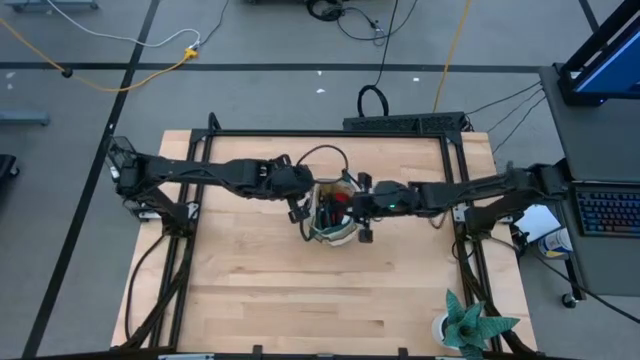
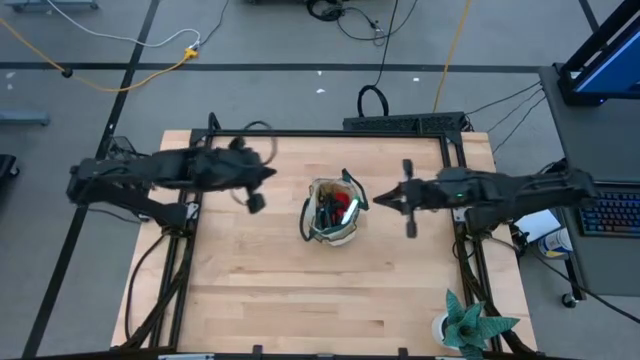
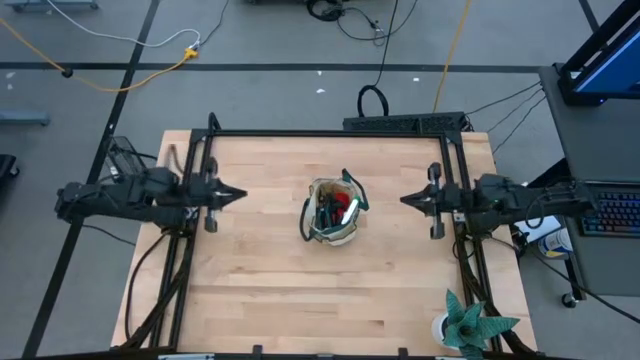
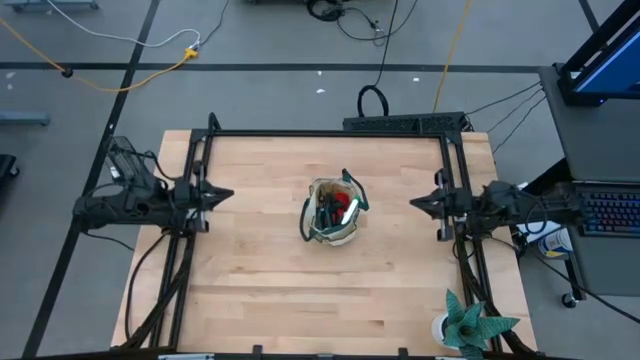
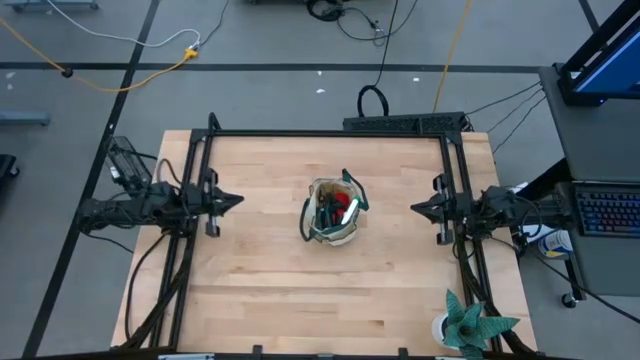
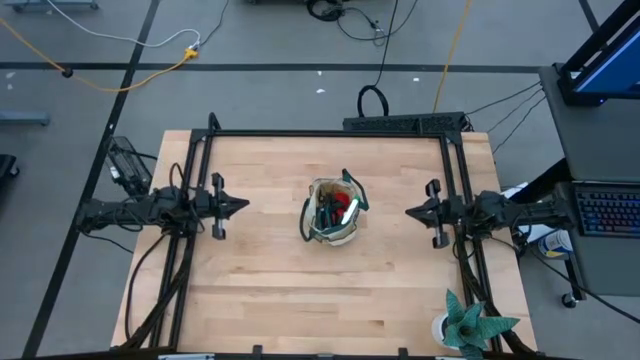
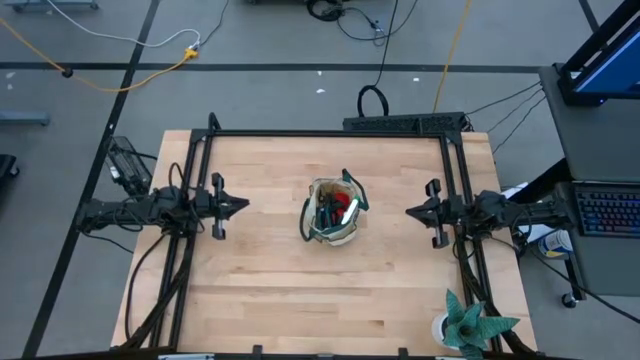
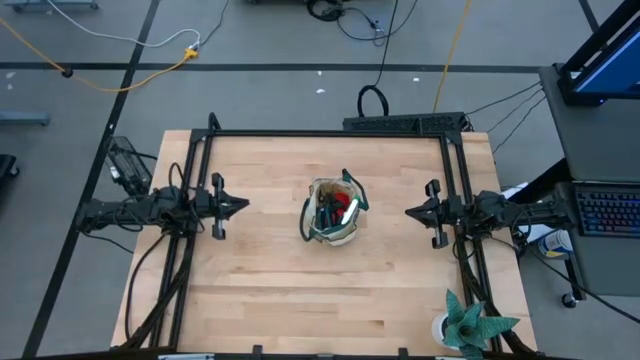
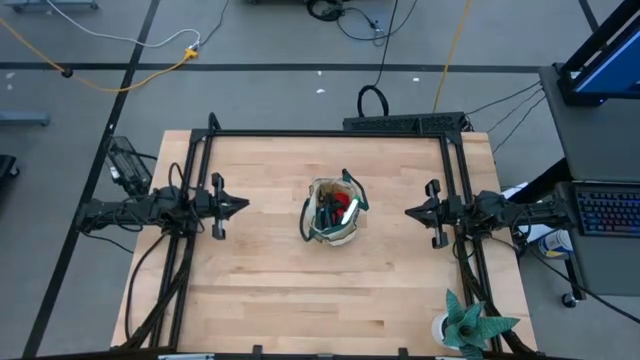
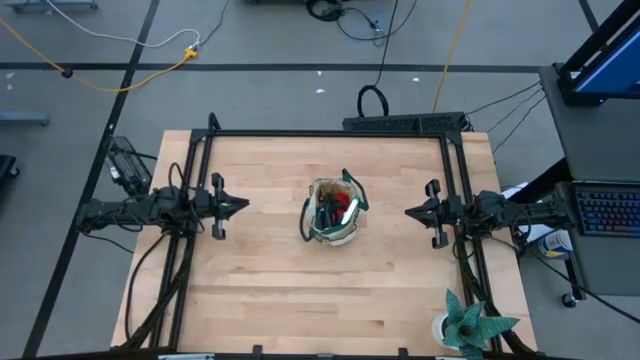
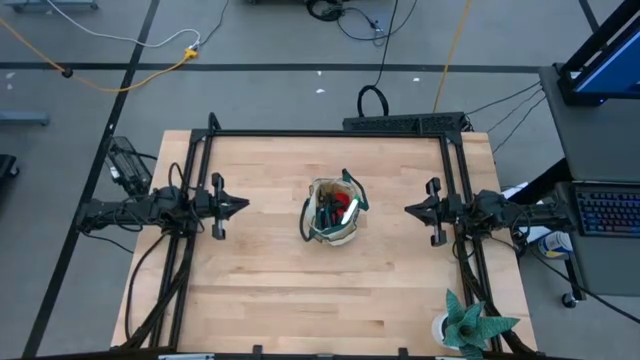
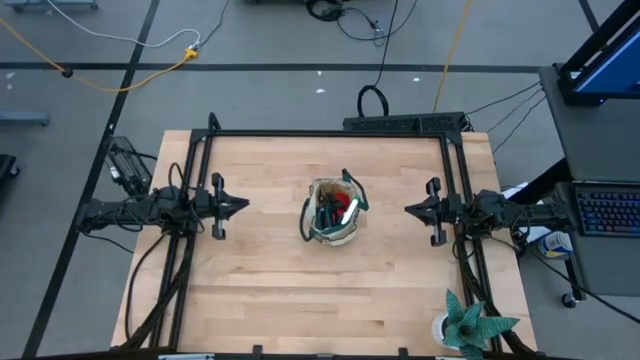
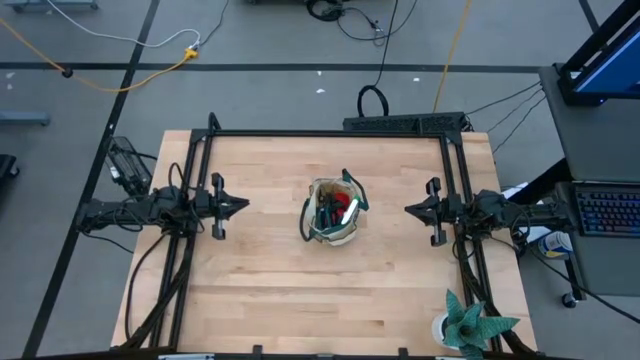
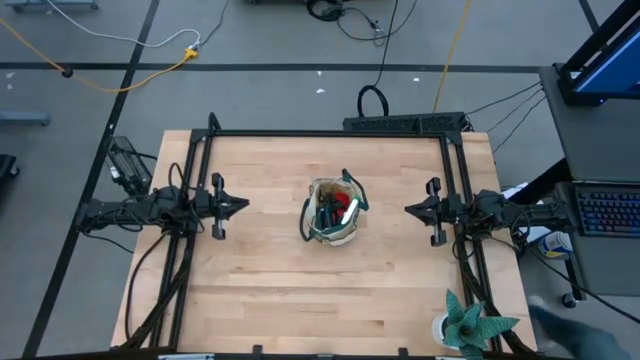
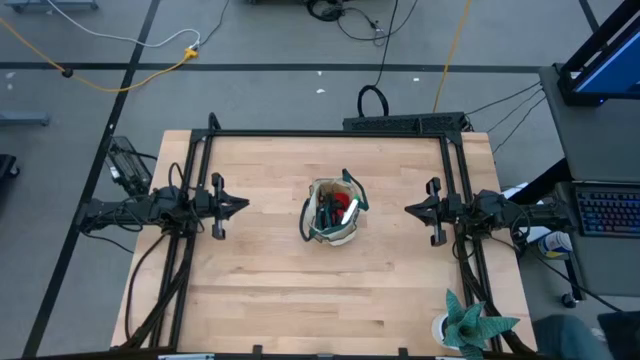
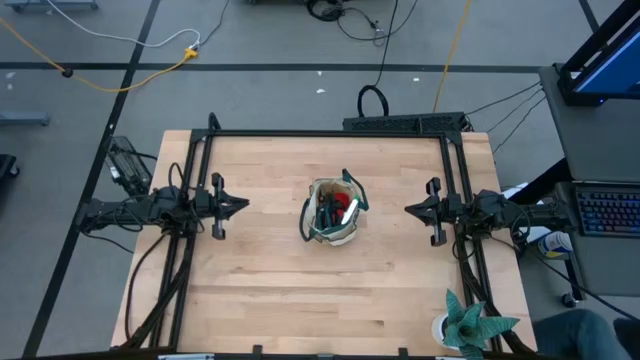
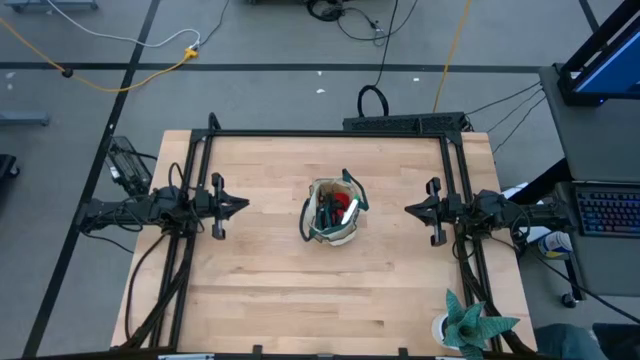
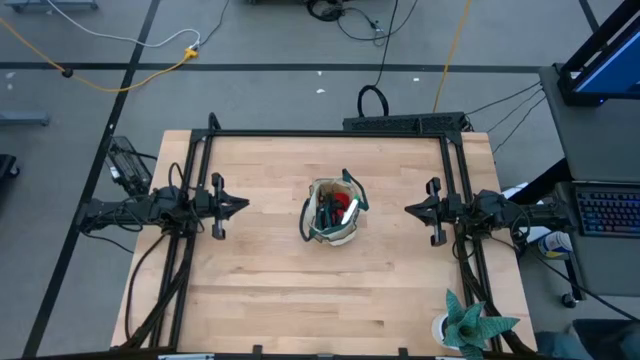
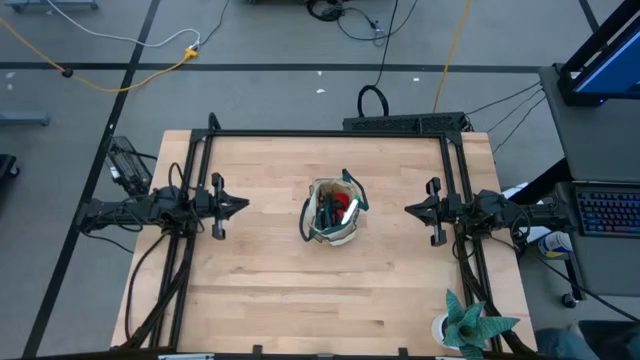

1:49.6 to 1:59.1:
Task: Pick & Place Garden tools in Gardening bag
Return to Home Position

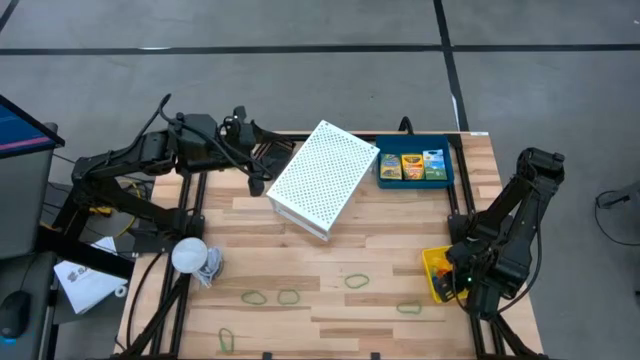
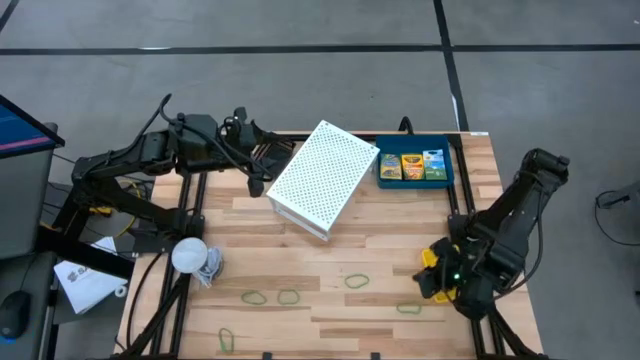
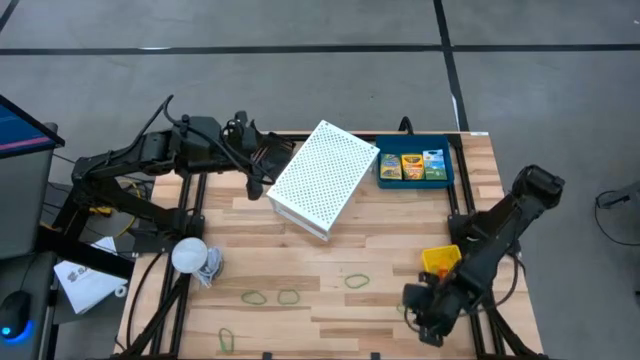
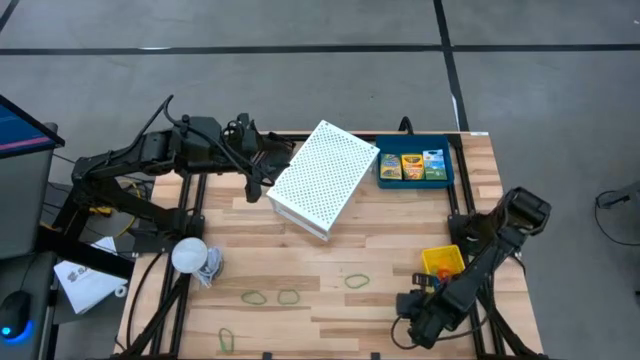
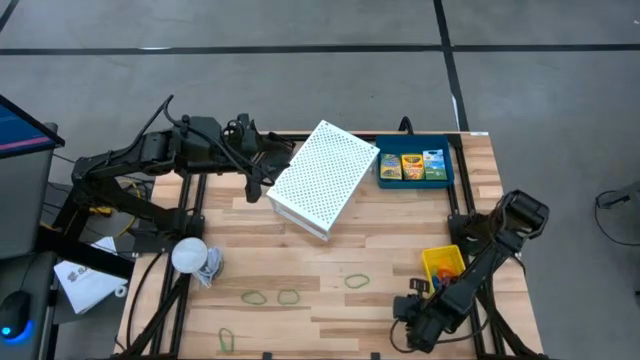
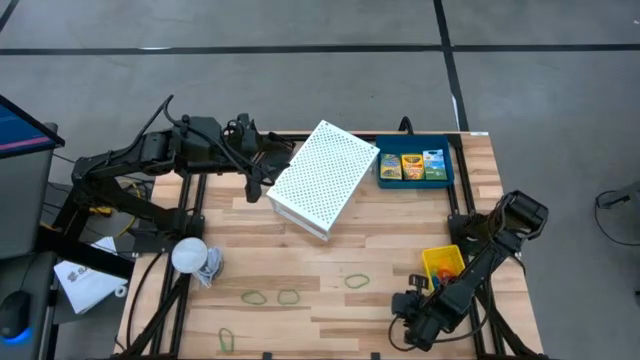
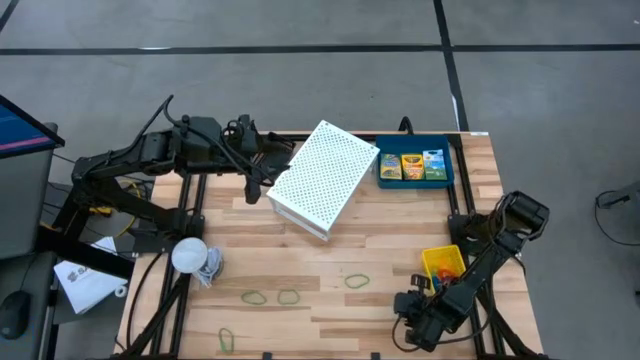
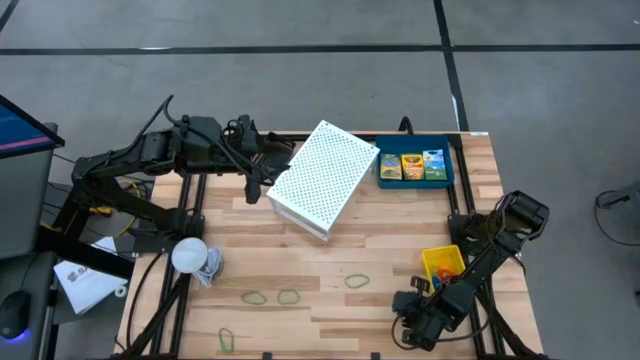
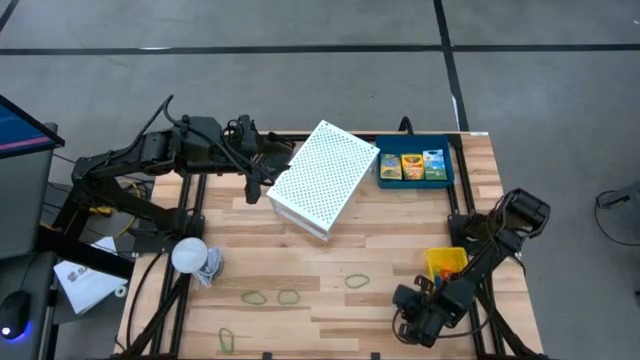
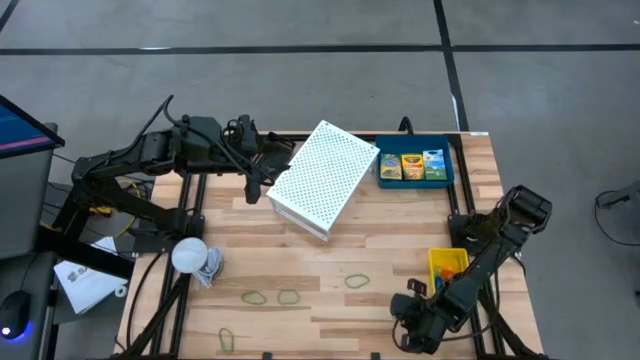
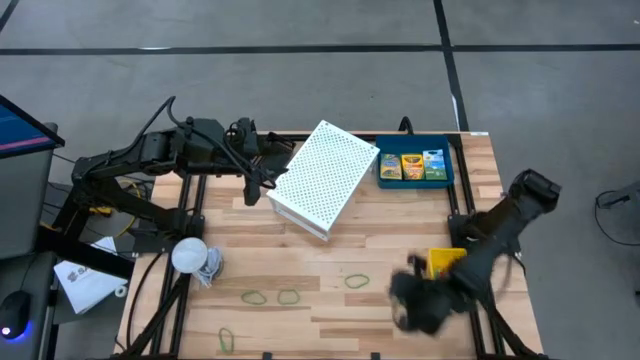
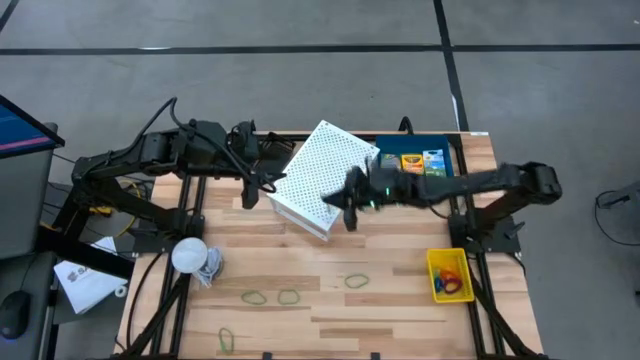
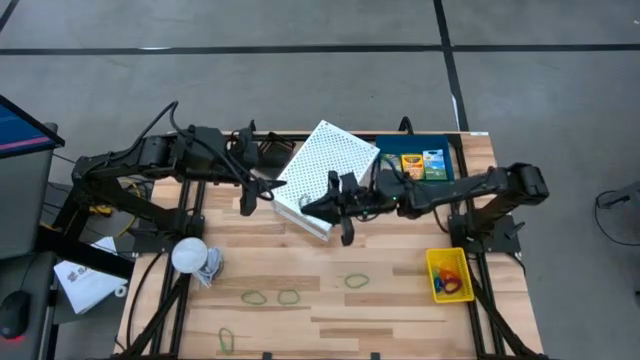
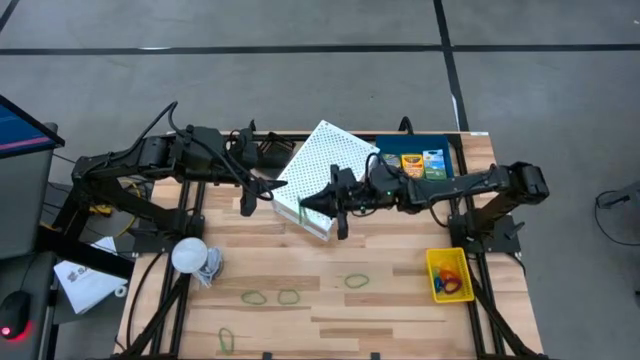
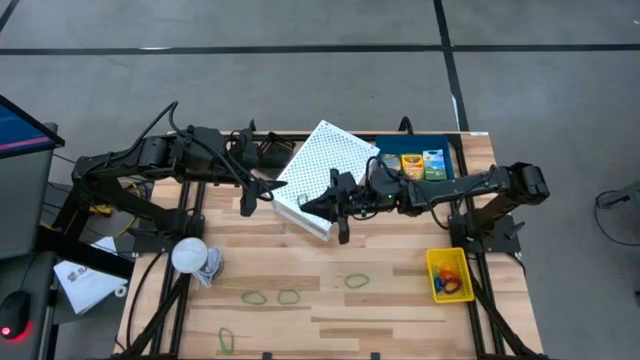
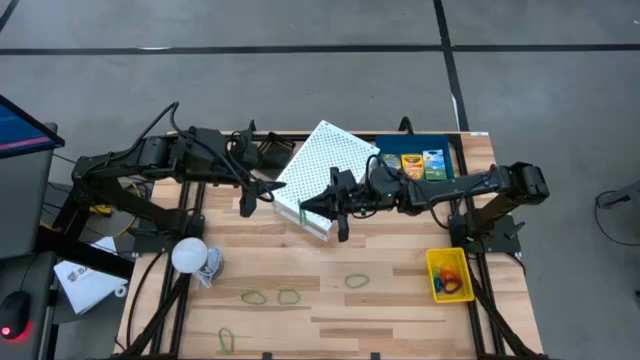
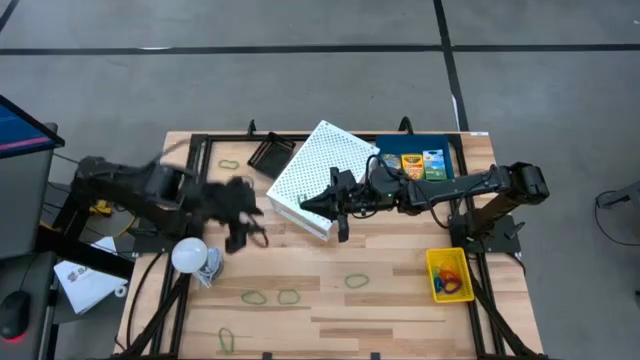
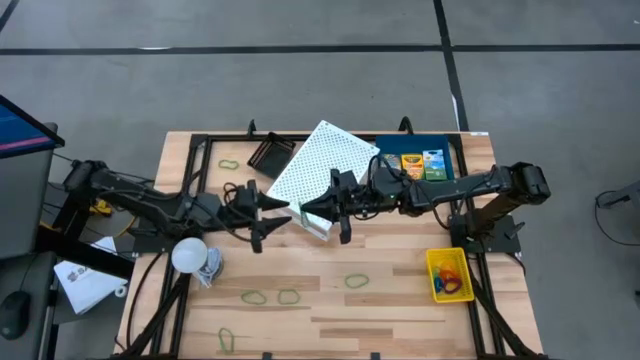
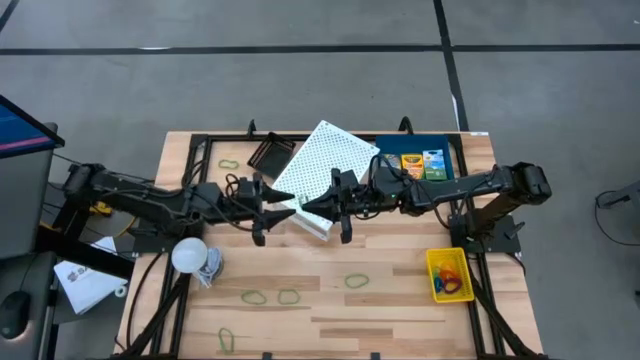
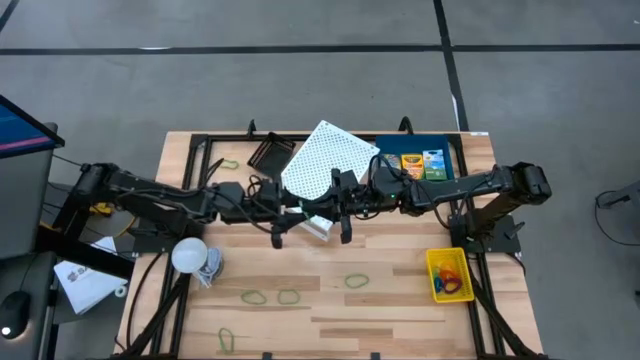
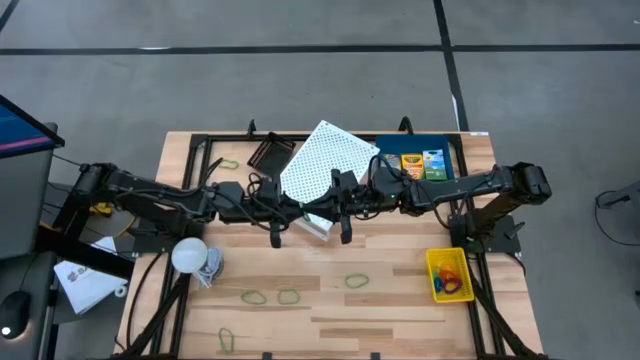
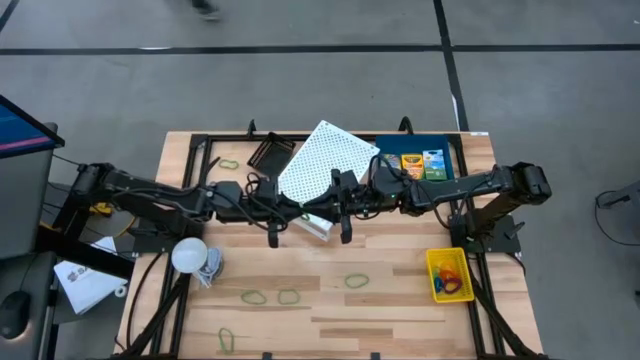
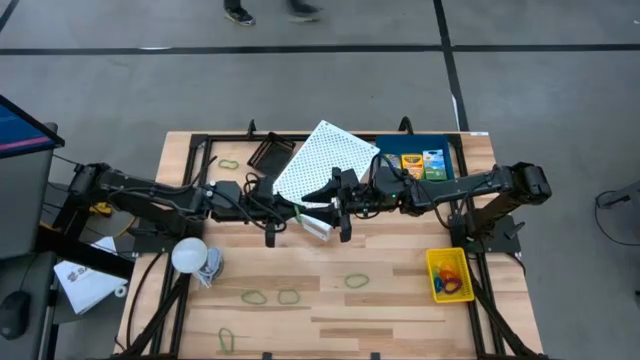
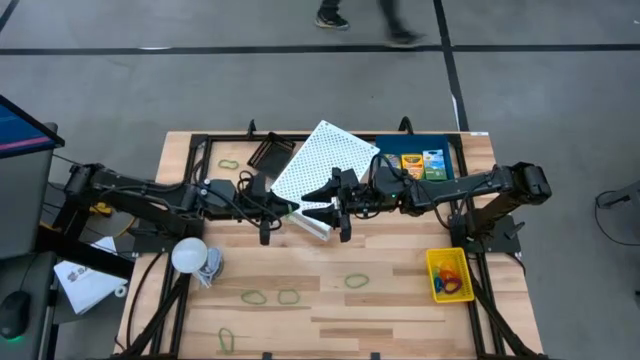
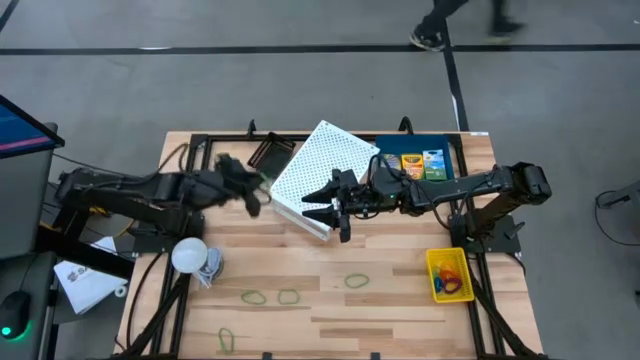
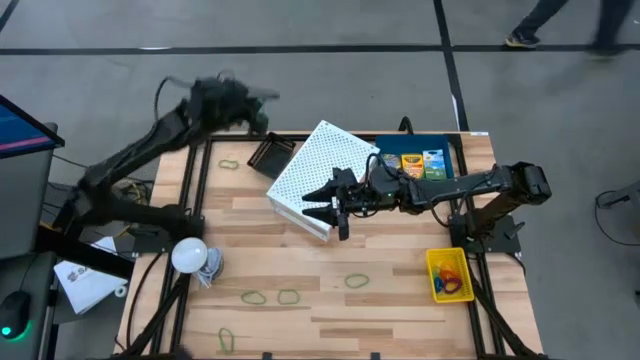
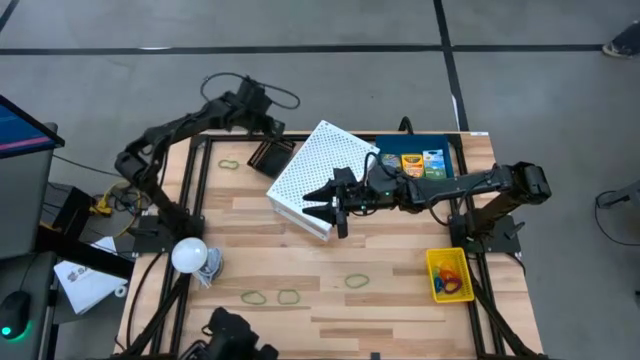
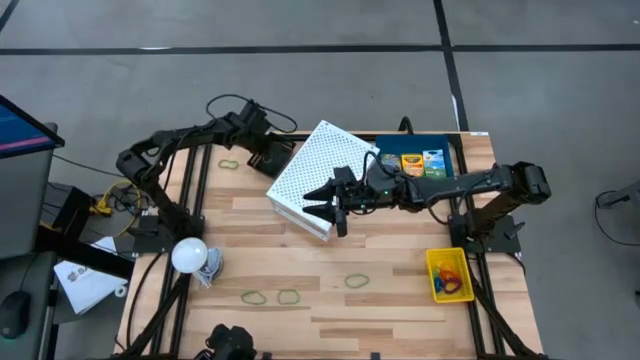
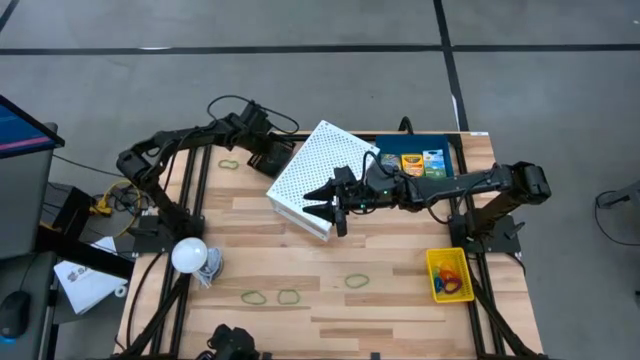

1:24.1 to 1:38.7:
Task: Pick & Place Office Desk Supplies
Put the green rubber band into the black bin
